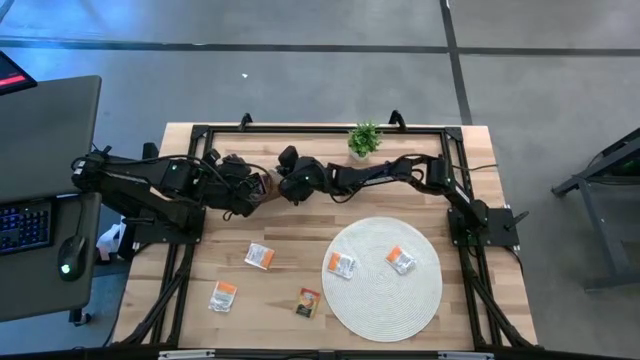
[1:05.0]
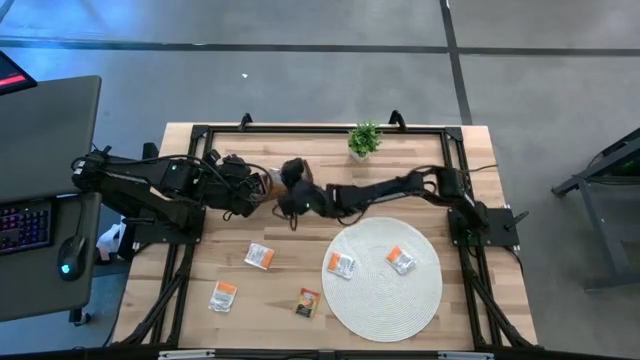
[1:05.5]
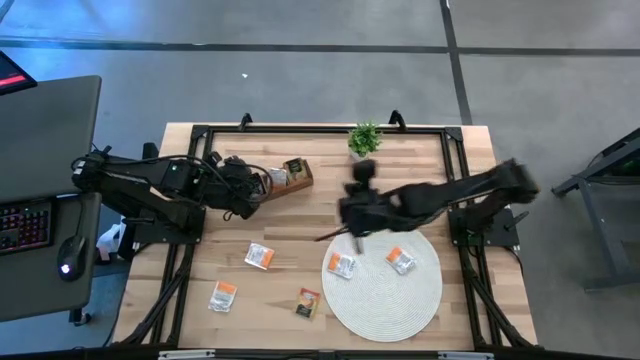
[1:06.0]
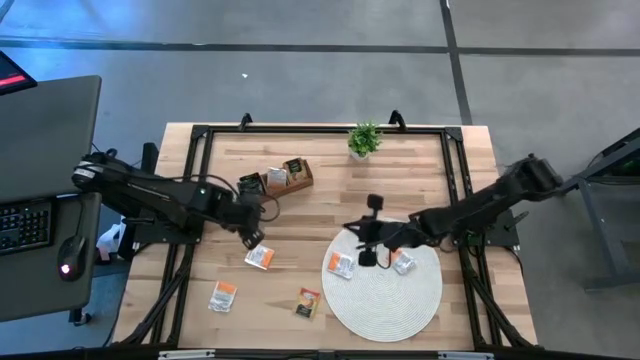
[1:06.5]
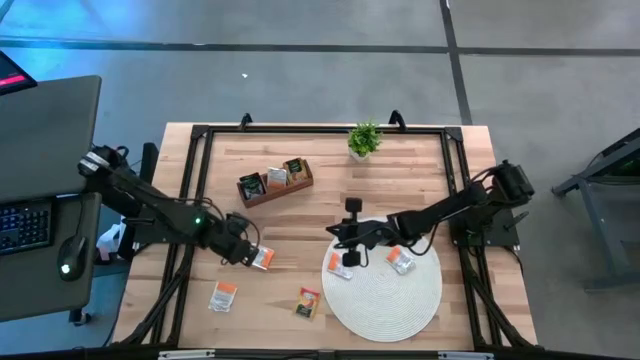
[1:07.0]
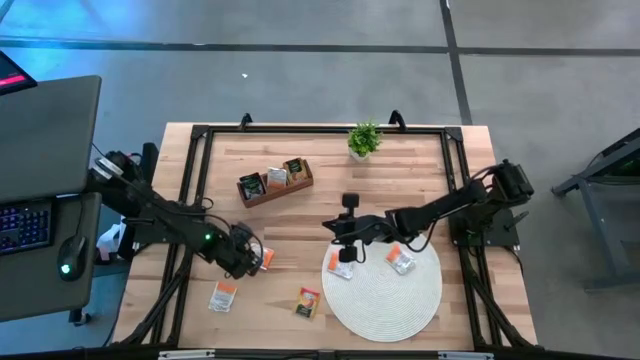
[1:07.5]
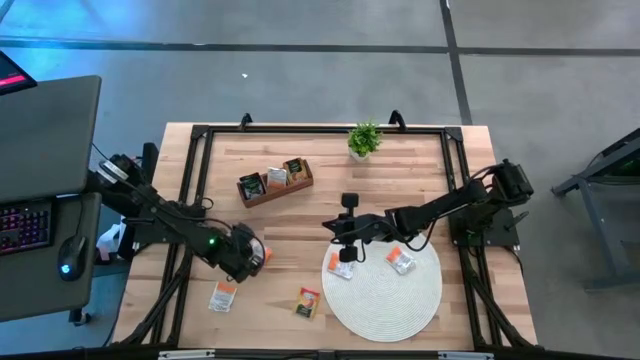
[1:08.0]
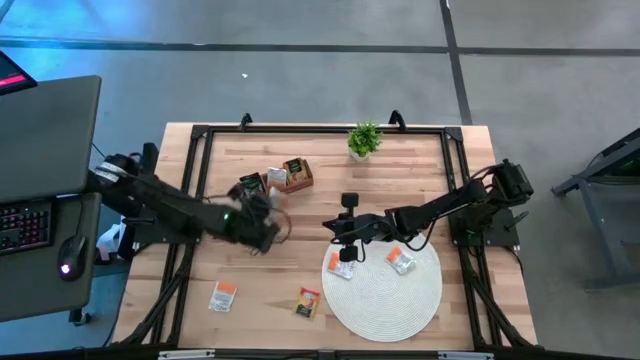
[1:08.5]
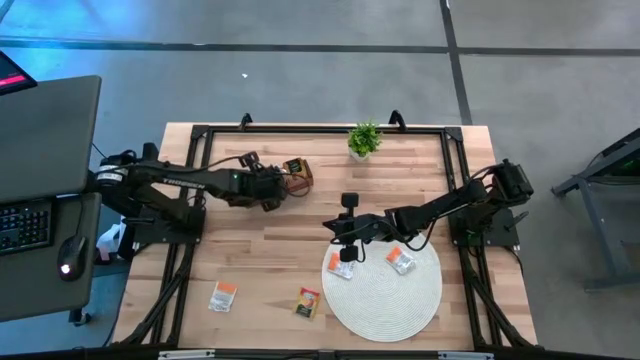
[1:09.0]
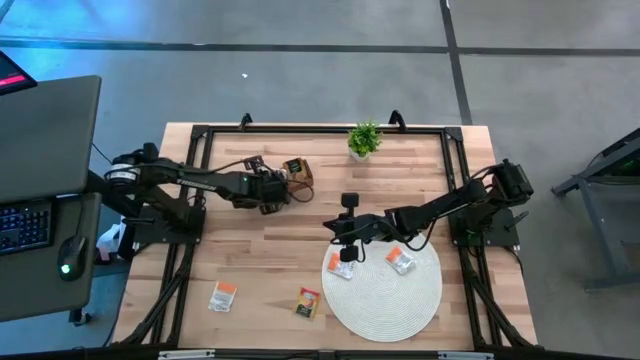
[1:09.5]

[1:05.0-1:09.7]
Task: Pick & Place Tea
Put the white tea bag into the middle section of the wooden organizer

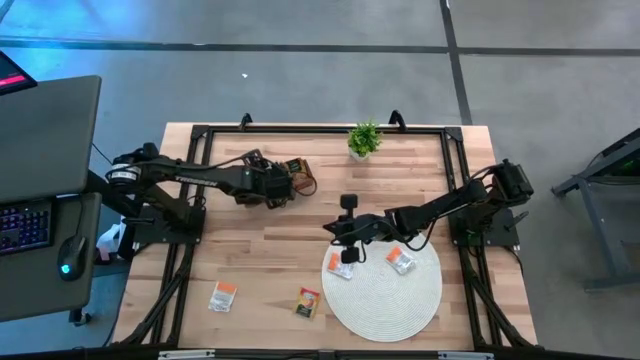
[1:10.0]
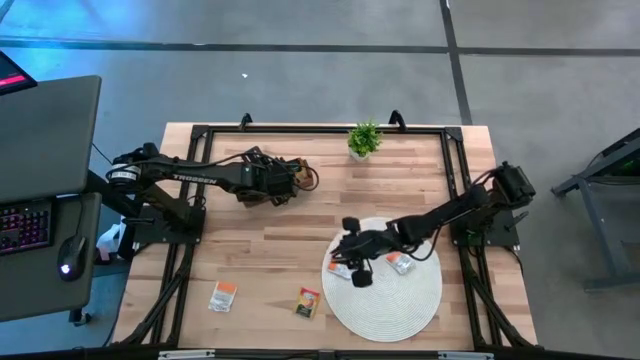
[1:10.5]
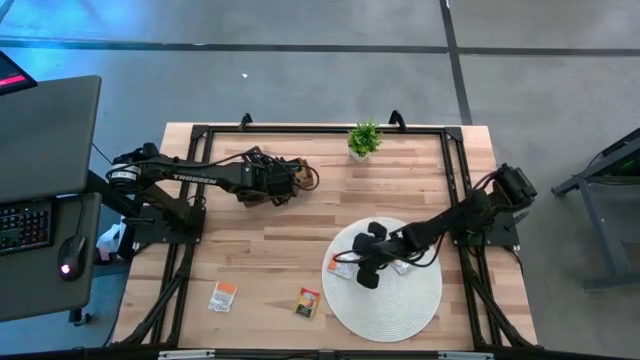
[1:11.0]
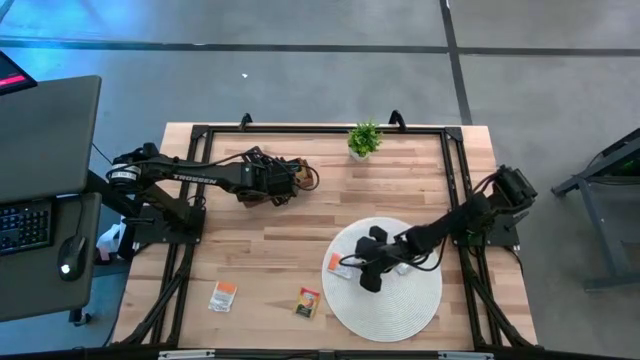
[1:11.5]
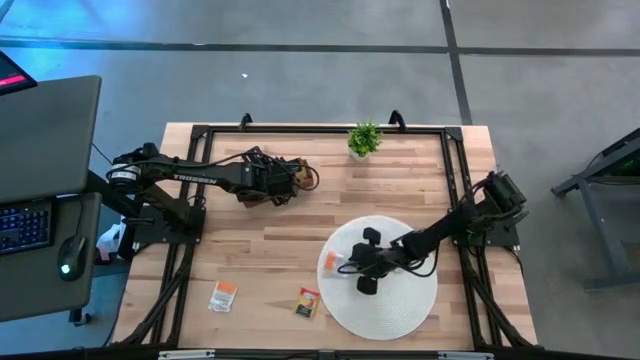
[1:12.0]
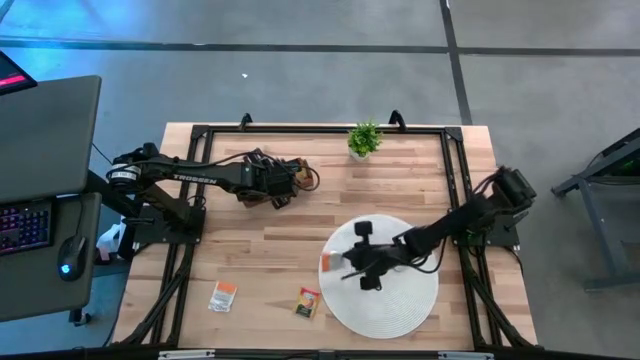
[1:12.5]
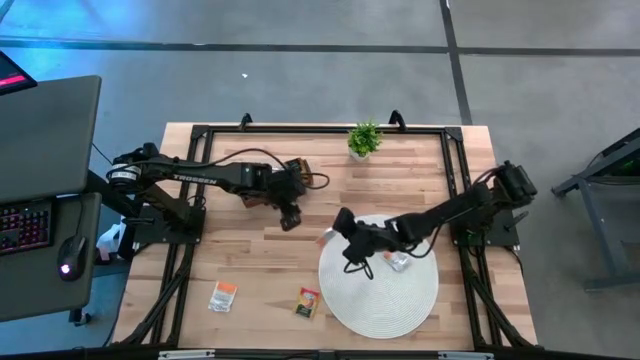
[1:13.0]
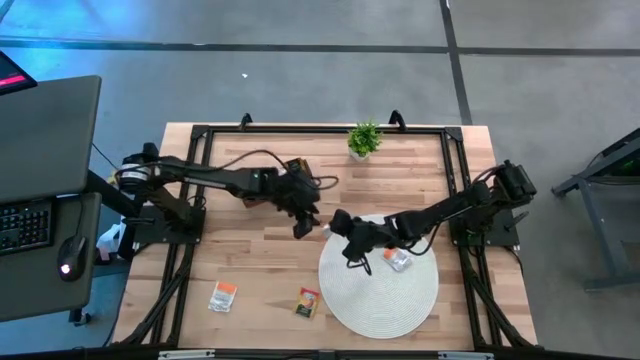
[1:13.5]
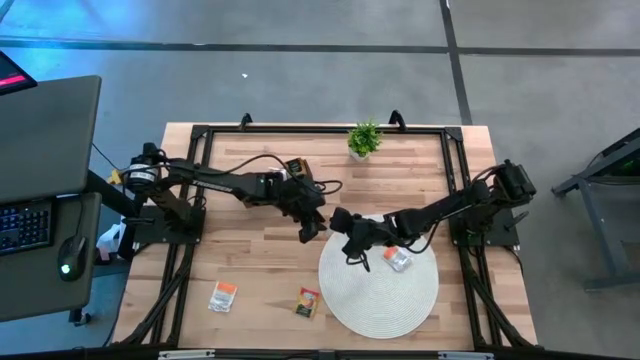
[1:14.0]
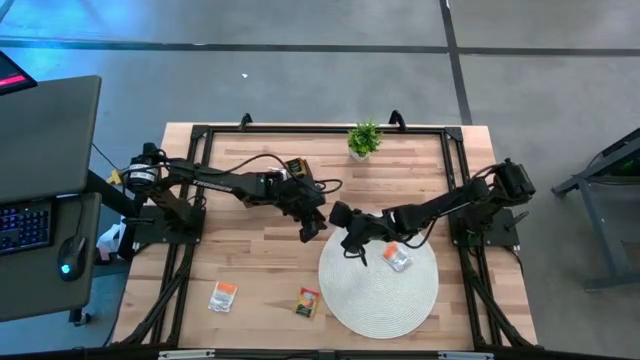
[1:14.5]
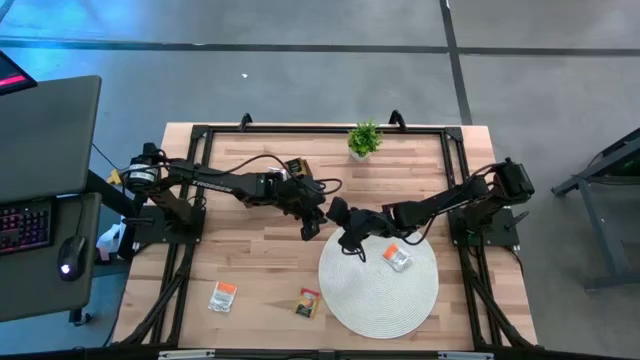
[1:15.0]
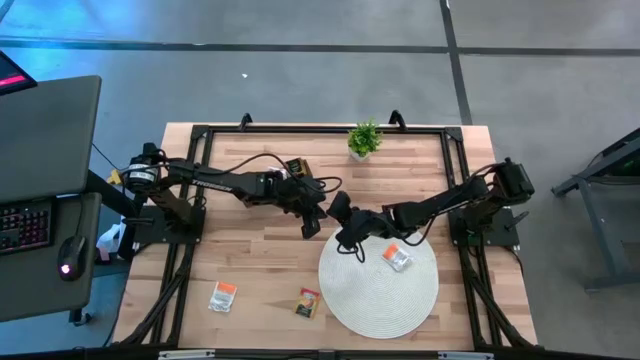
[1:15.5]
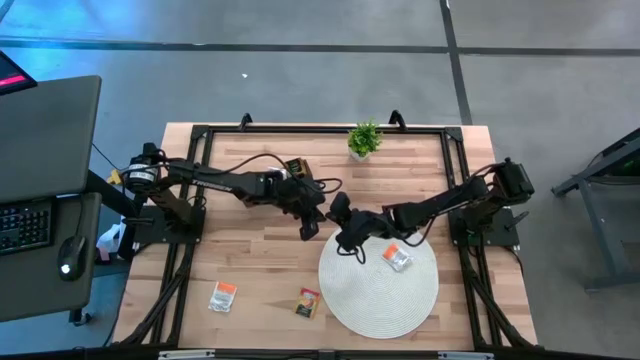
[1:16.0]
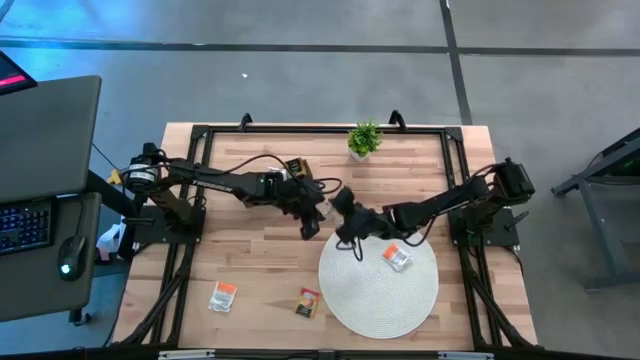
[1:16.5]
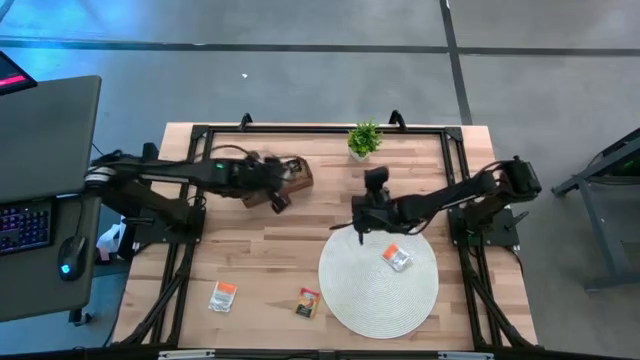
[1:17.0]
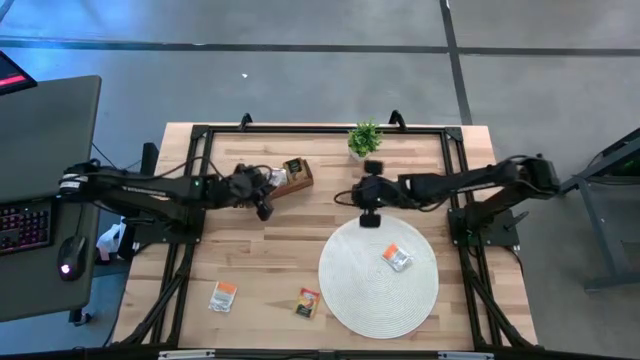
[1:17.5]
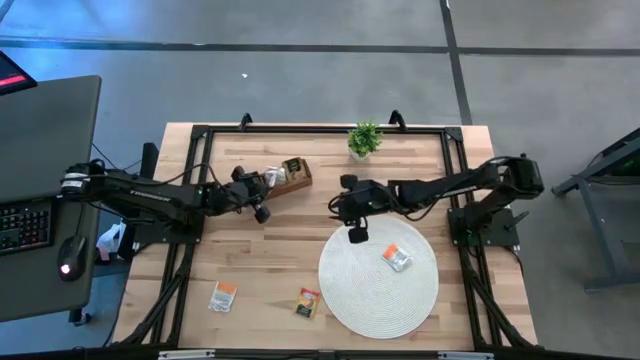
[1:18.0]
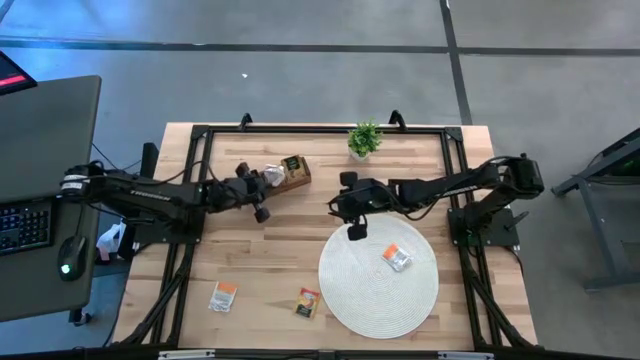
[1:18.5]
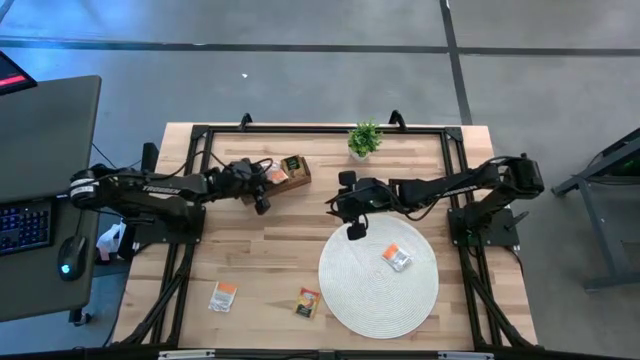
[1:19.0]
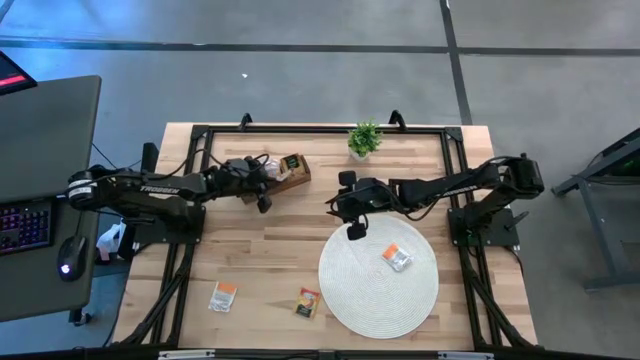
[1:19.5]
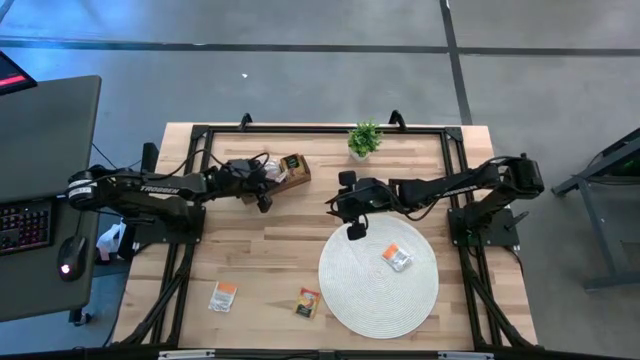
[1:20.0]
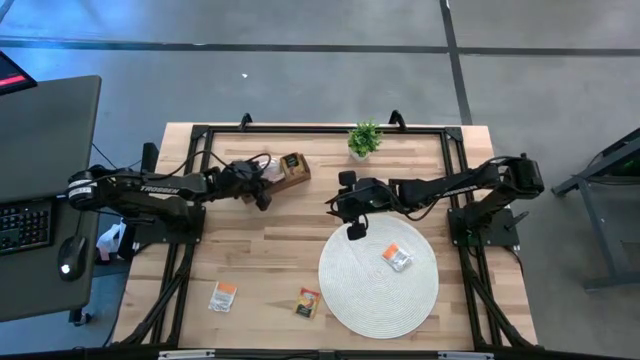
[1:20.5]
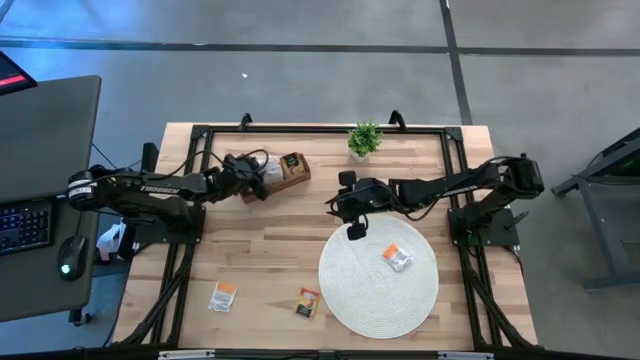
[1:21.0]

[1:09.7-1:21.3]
Put the white tea bag into the middle section of the wooden organizer

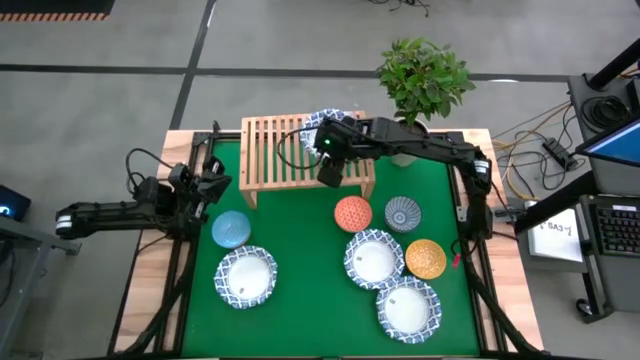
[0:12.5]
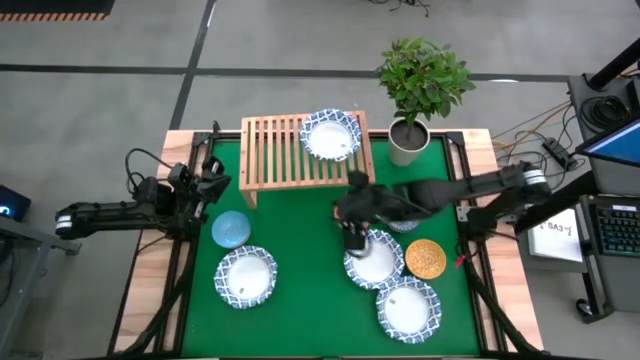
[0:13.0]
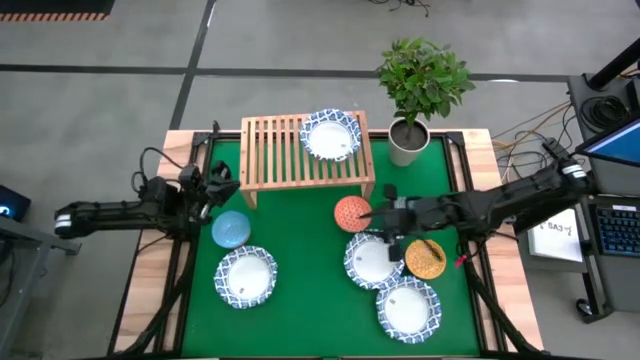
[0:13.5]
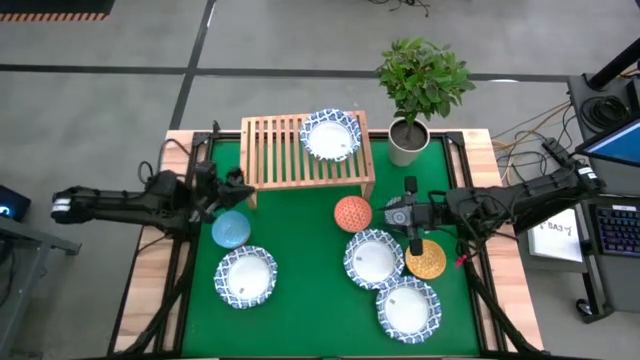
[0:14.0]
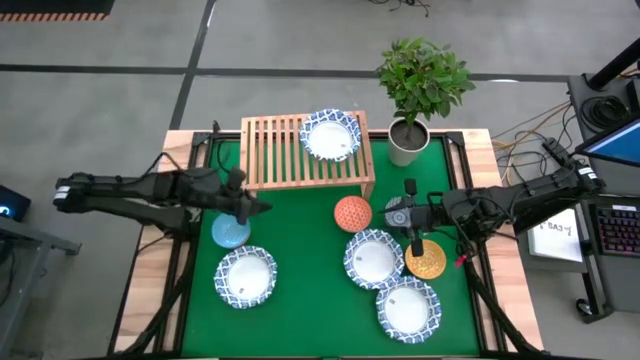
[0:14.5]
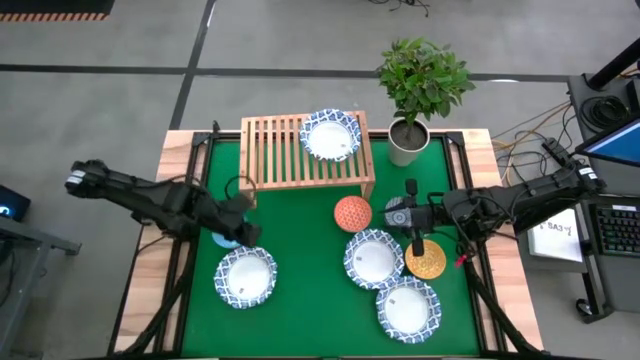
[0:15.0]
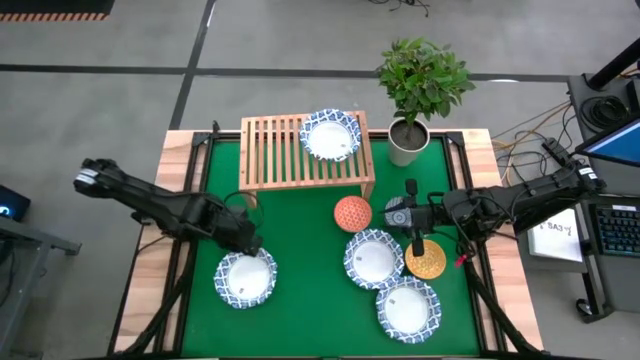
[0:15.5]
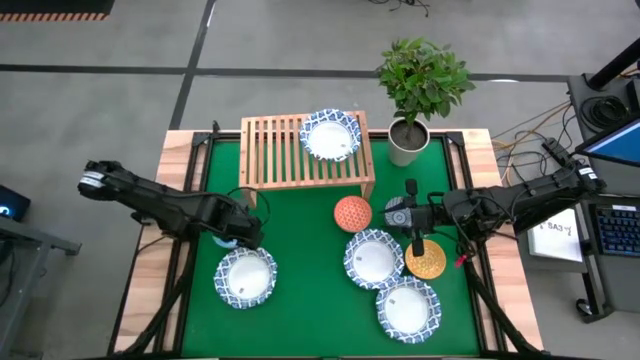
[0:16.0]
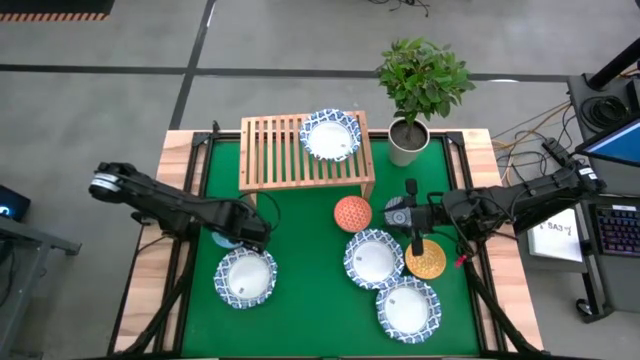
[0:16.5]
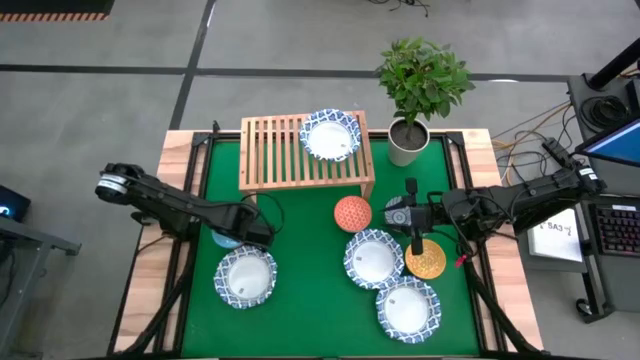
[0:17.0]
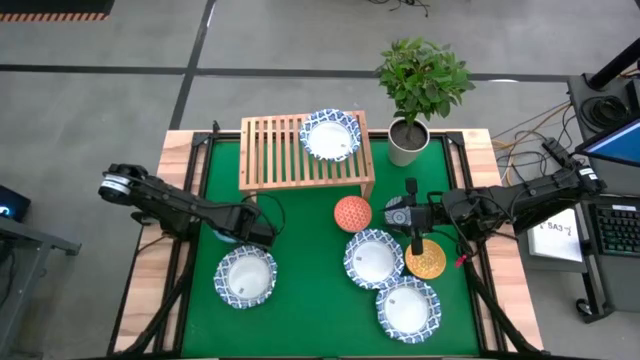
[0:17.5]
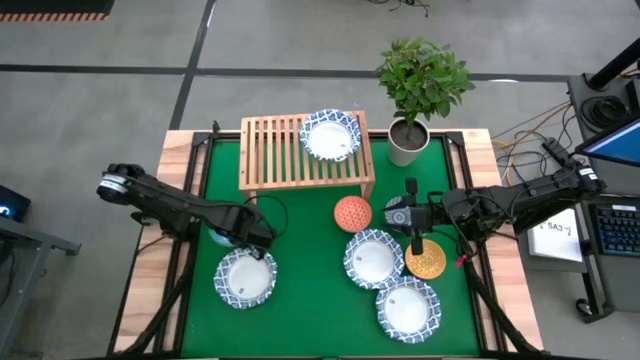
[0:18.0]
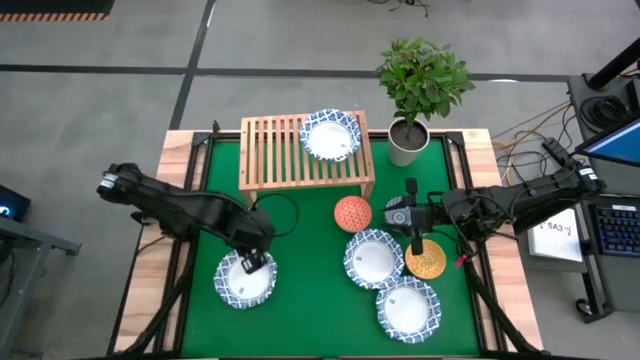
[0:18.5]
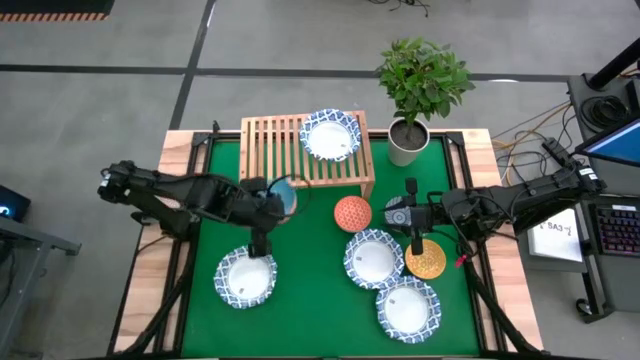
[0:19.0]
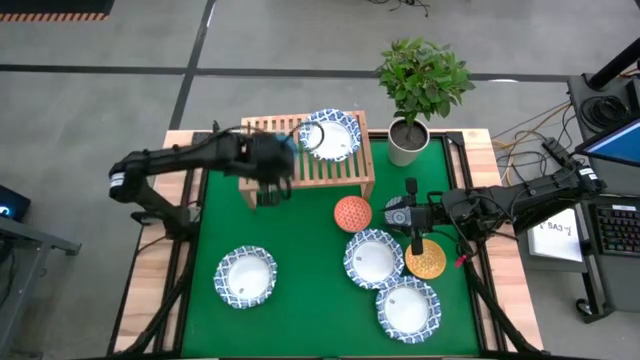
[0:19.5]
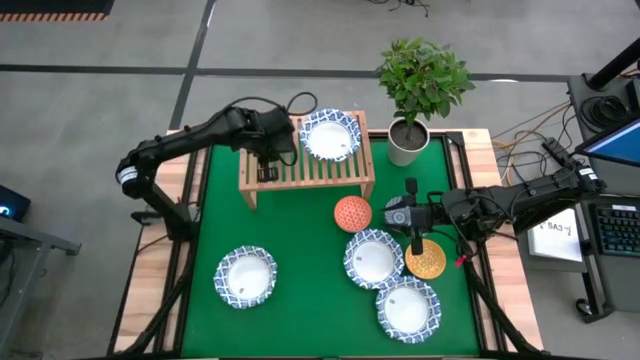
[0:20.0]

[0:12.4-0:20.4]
Task: Place and stack bowls onto a shelf
Put the blue bowl on the shelf
